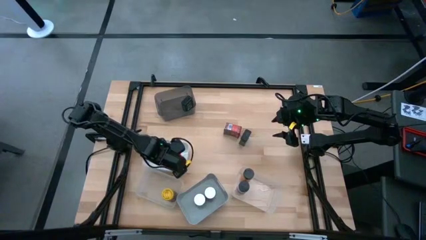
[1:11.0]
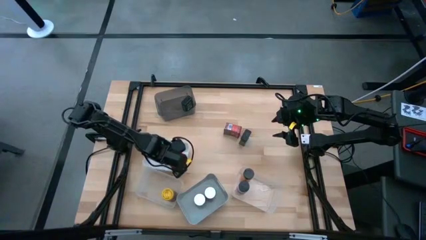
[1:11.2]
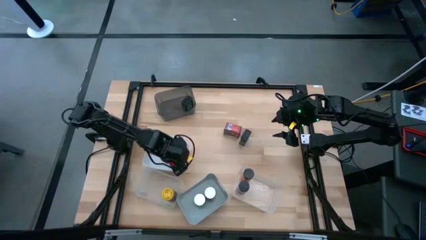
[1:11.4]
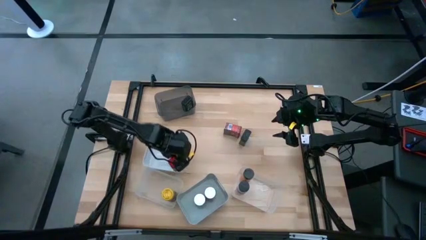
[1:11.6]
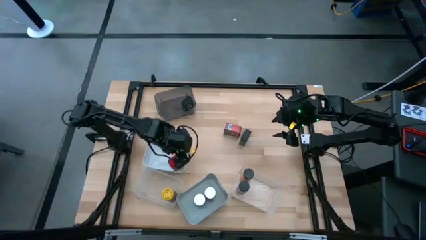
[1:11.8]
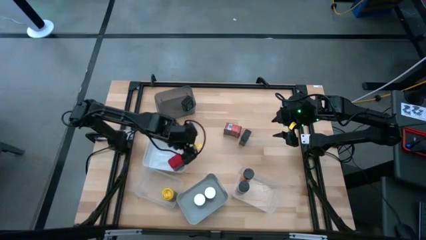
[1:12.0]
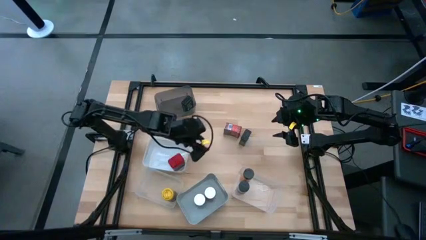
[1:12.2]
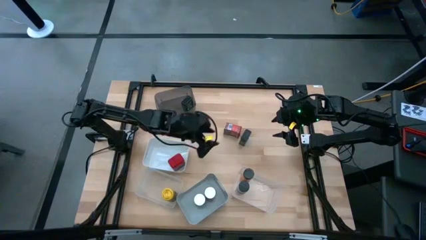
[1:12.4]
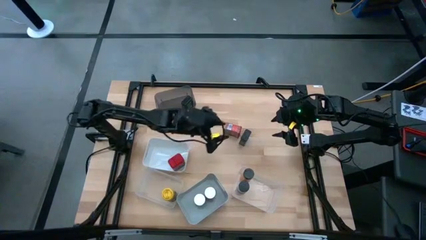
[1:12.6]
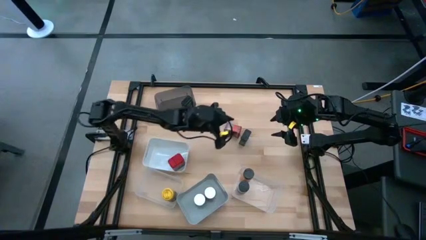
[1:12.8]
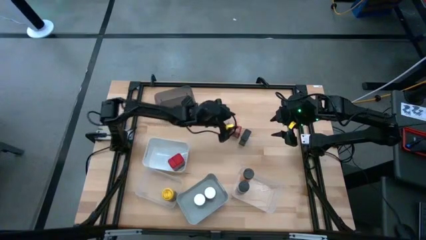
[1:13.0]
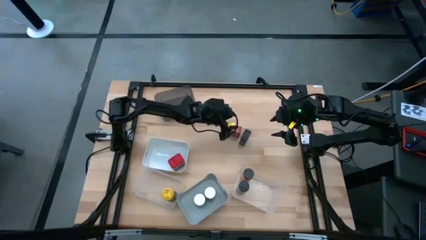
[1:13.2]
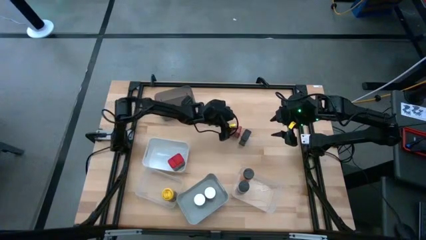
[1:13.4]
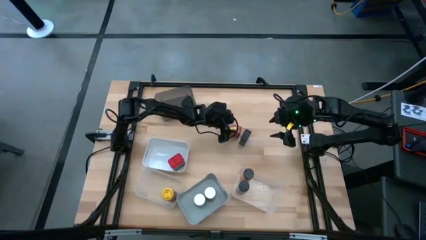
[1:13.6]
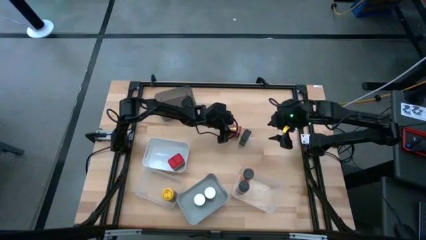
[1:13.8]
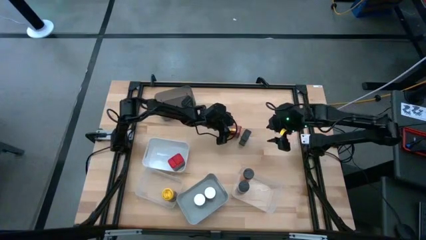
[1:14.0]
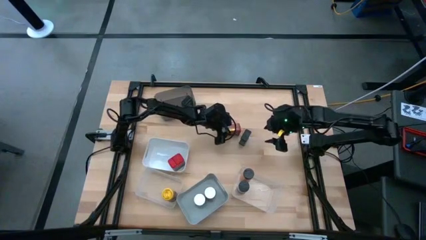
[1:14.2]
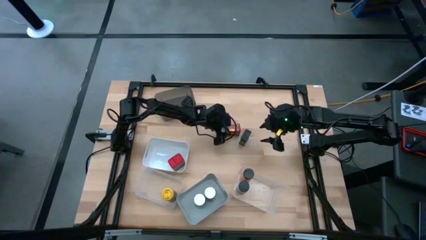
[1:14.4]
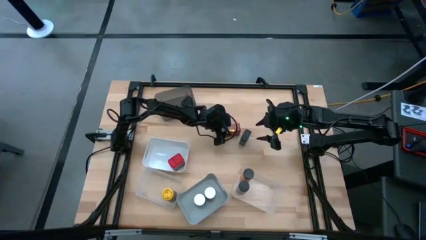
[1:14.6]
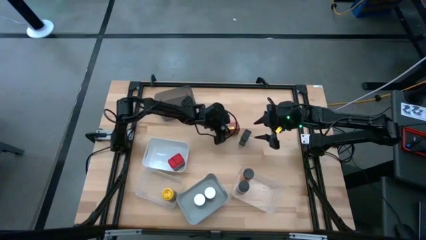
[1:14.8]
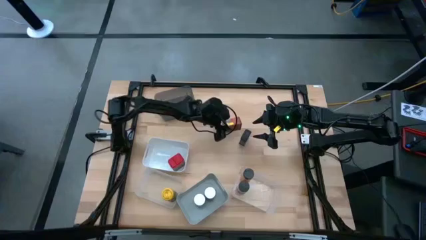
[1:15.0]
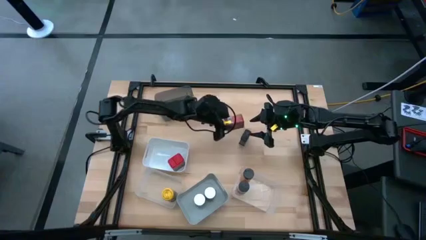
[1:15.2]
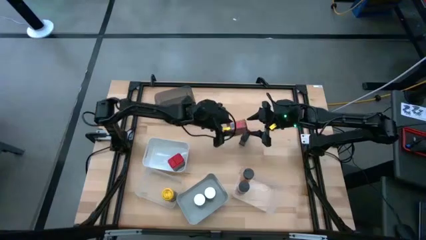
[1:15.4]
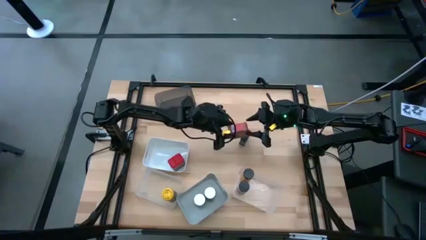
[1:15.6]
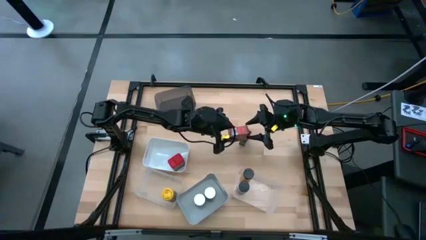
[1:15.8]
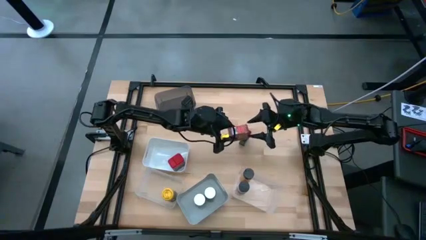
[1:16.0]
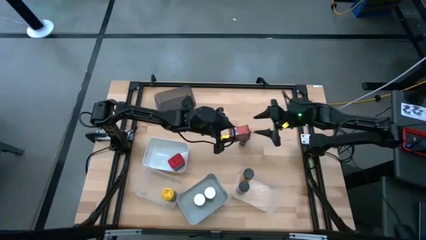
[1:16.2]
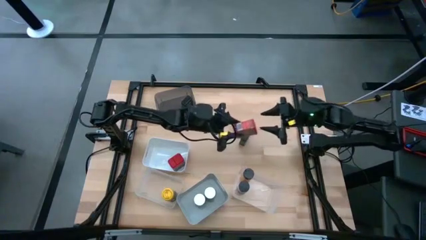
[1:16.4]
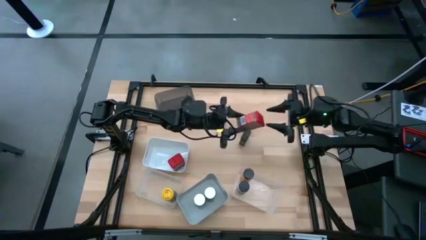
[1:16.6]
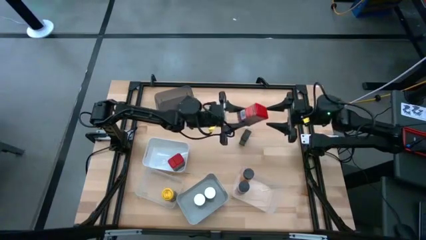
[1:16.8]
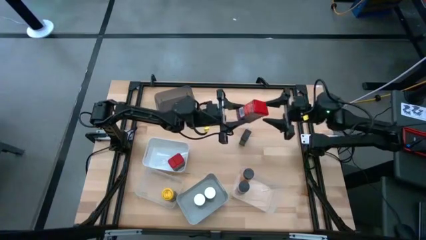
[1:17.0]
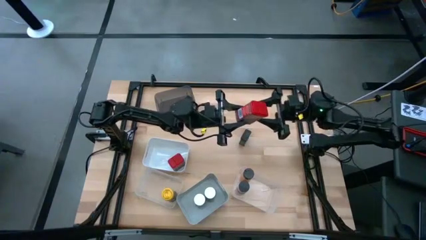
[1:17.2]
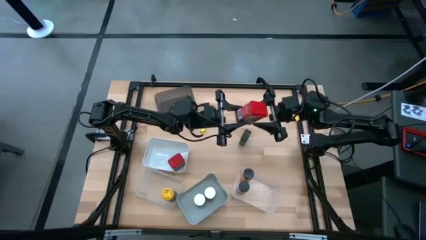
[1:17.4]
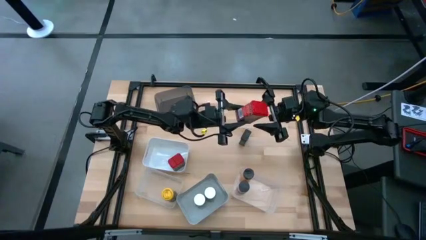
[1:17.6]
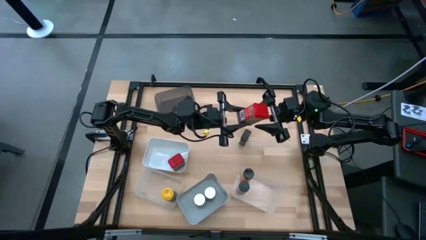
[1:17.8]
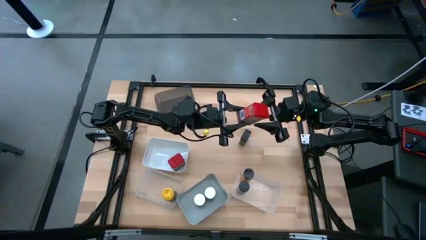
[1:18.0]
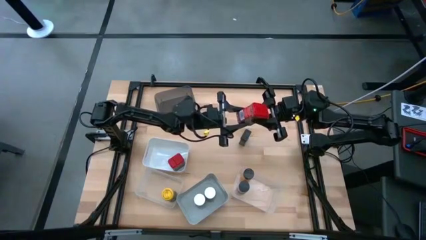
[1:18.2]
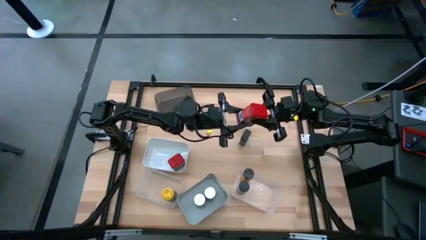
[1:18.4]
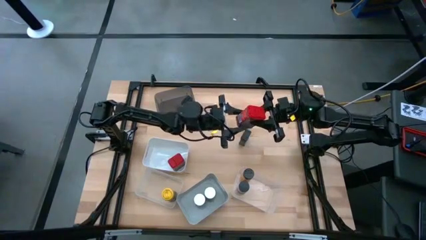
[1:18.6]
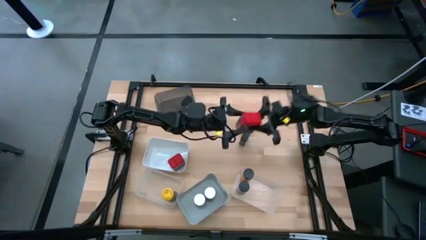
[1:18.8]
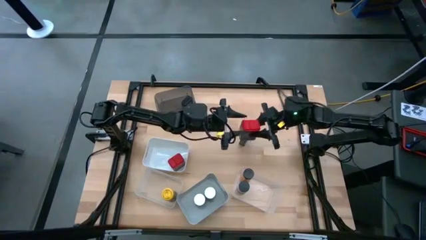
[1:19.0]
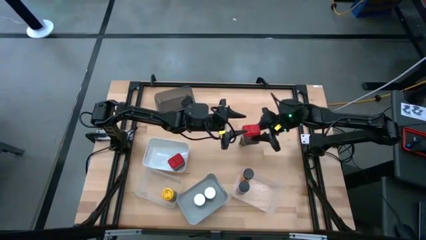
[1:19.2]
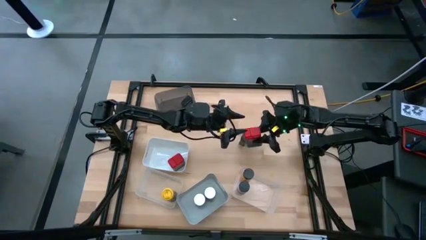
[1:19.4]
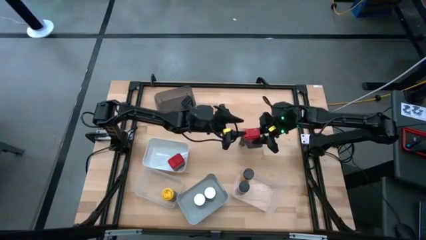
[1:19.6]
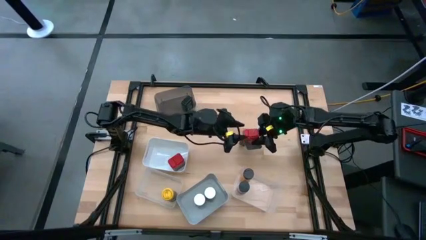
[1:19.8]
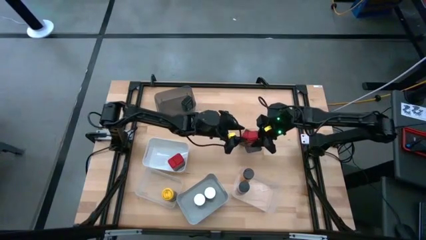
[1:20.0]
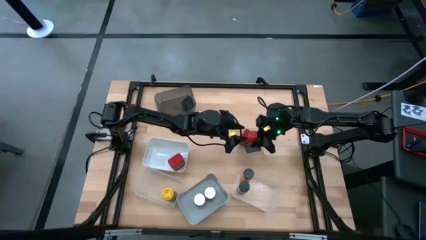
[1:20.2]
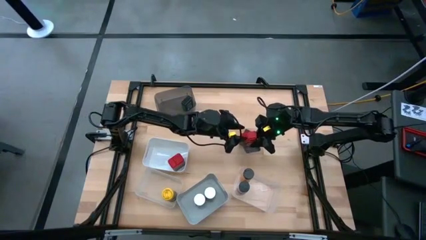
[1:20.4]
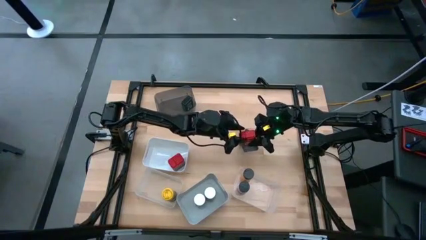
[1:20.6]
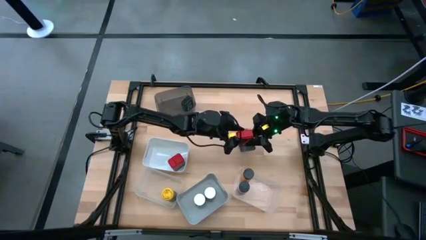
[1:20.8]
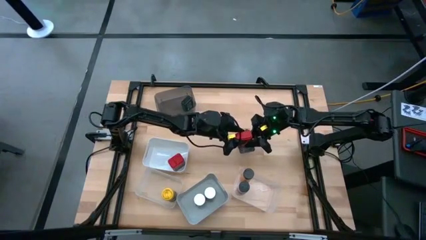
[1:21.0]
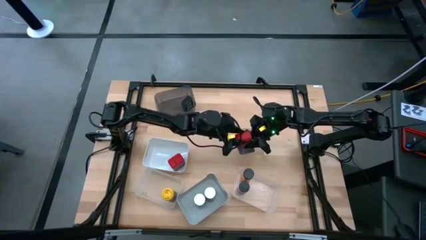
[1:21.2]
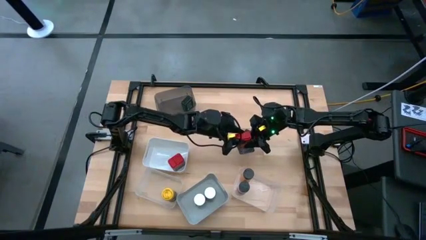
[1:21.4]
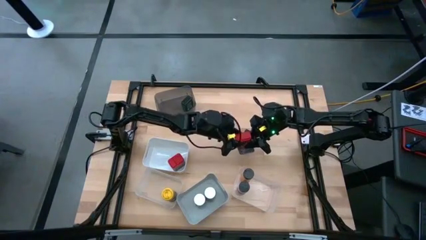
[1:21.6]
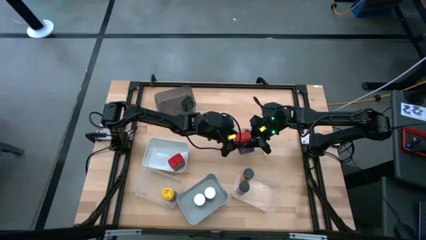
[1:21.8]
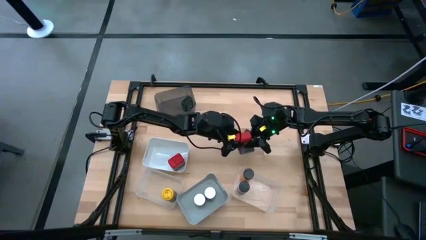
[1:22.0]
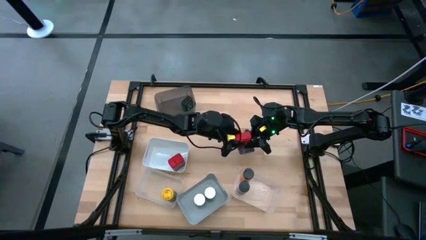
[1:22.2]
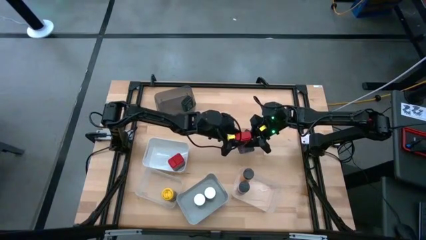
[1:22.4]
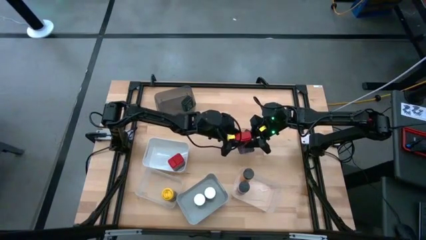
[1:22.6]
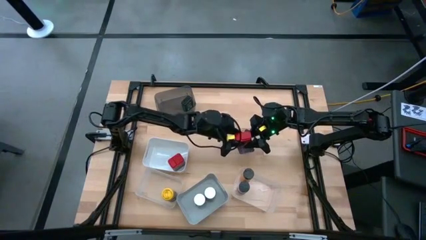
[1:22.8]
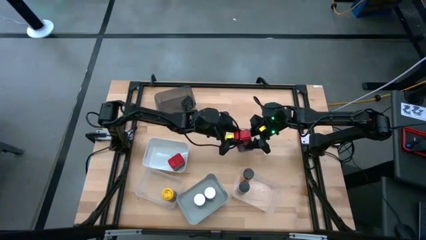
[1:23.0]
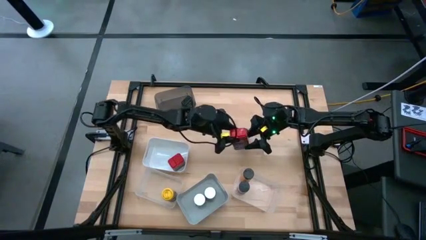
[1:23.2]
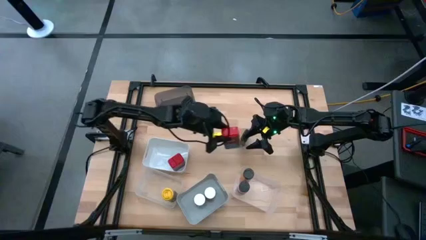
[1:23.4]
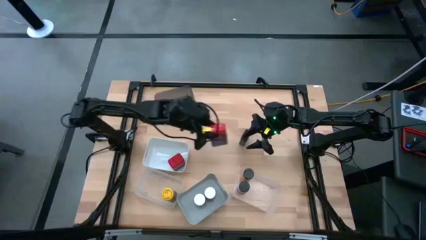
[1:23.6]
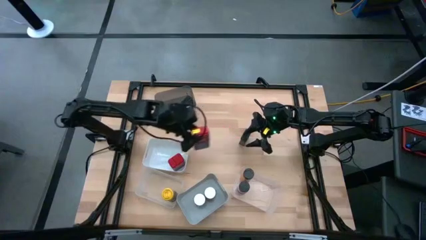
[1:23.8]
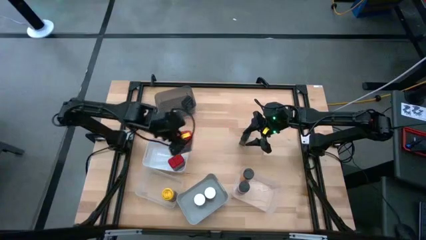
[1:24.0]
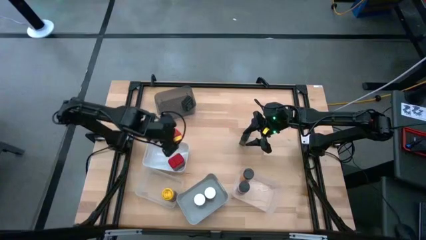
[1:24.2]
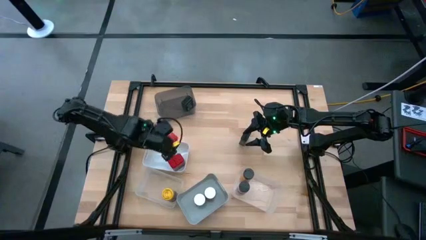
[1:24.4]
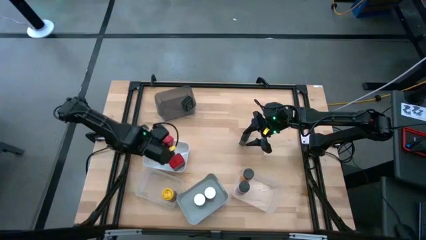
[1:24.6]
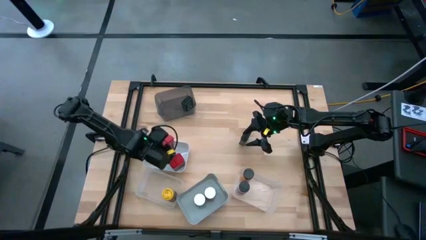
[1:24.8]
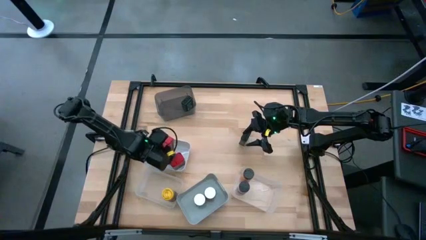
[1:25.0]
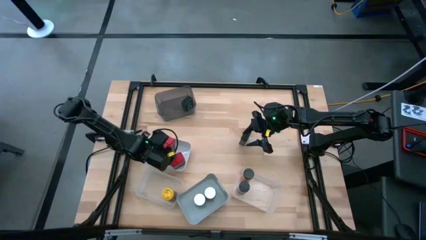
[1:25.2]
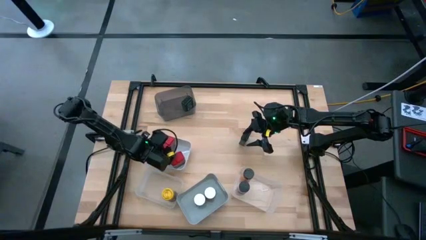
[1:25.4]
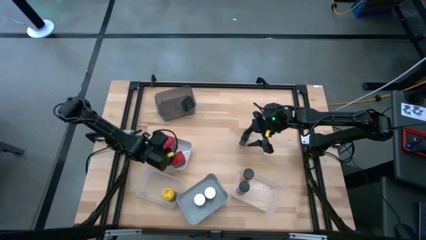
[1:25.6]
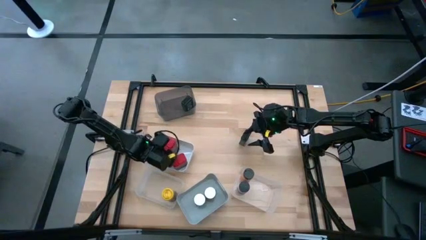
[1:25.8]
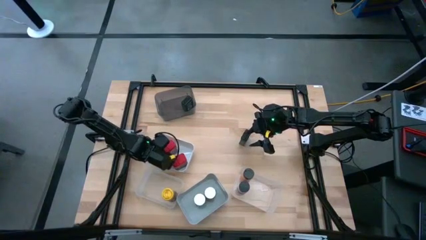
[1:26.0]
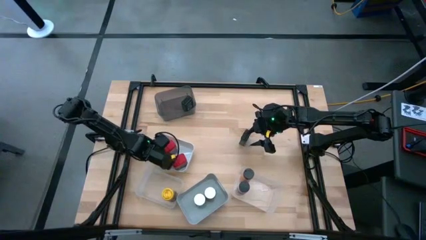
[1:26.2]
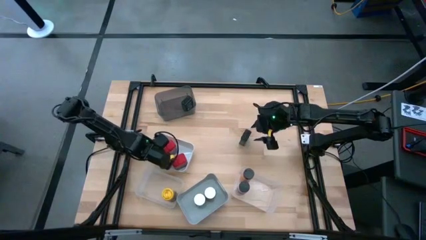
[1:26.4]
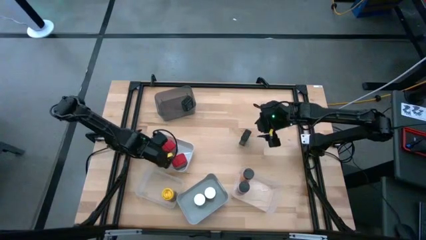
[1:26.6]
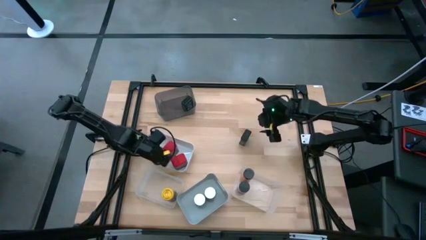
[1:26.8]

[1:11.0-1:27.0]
Task: Sort spices by type
Put the red seasoning can into the white bin
